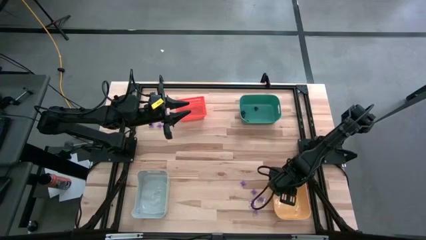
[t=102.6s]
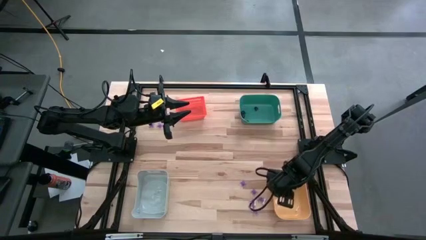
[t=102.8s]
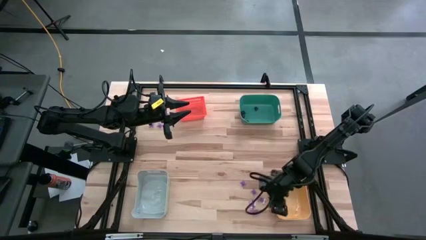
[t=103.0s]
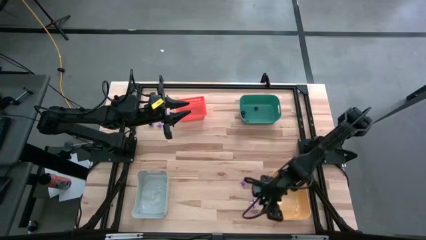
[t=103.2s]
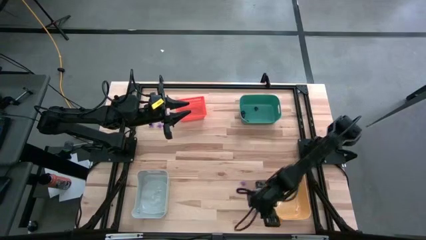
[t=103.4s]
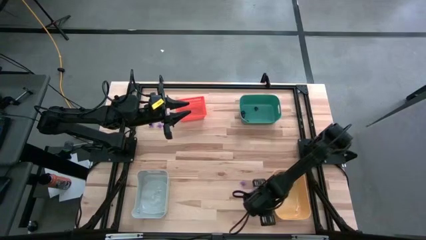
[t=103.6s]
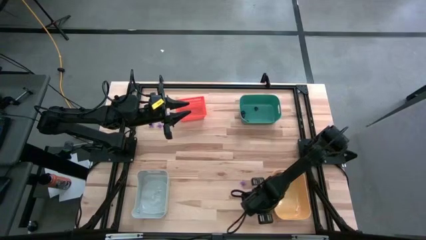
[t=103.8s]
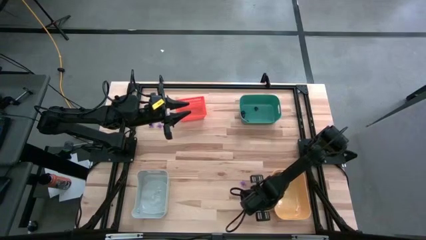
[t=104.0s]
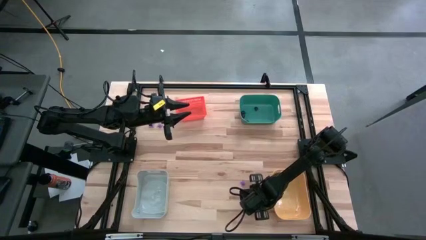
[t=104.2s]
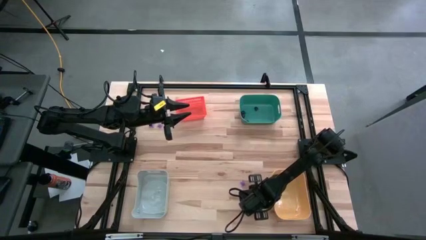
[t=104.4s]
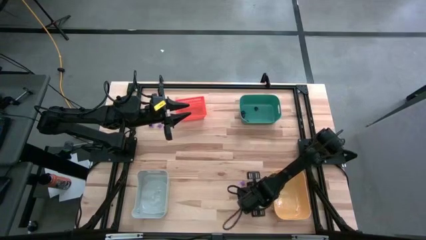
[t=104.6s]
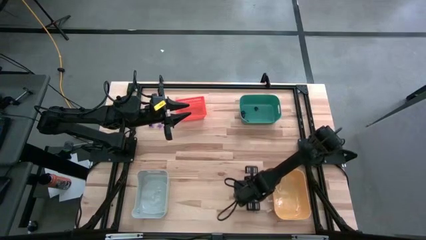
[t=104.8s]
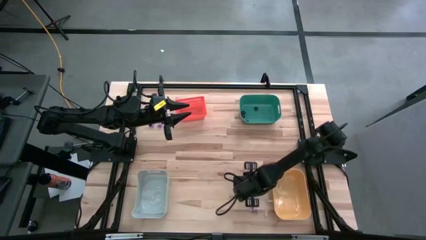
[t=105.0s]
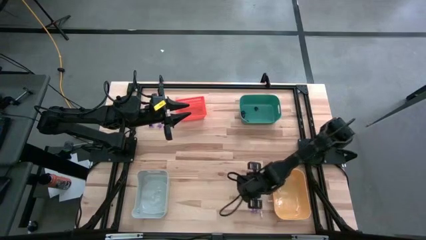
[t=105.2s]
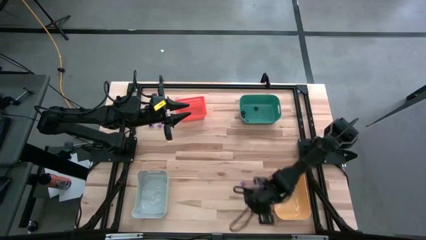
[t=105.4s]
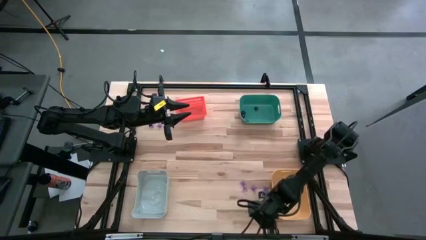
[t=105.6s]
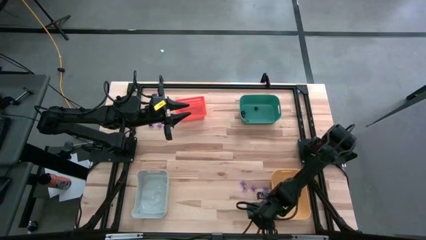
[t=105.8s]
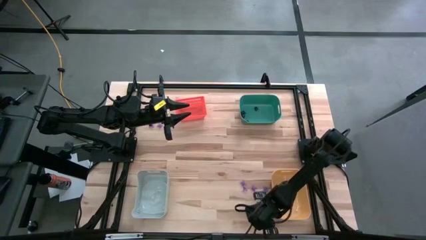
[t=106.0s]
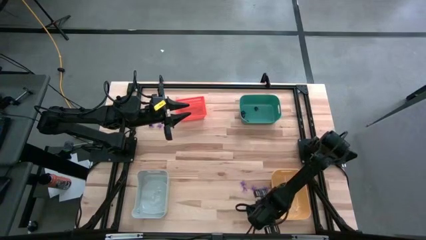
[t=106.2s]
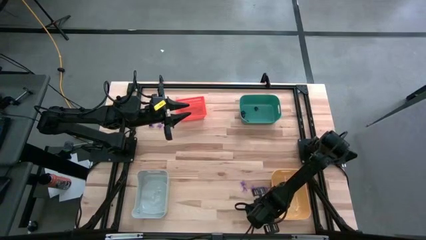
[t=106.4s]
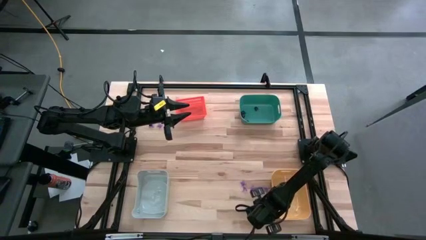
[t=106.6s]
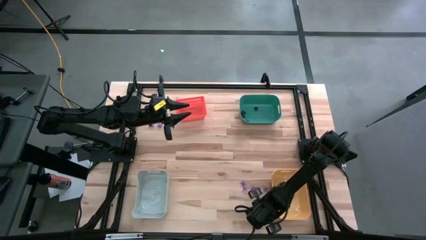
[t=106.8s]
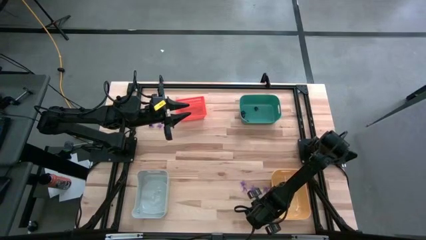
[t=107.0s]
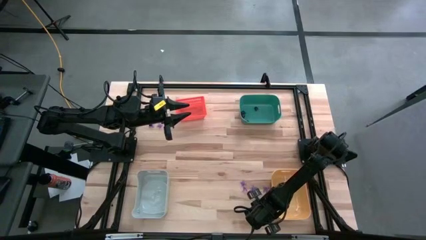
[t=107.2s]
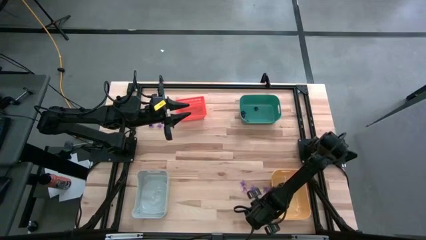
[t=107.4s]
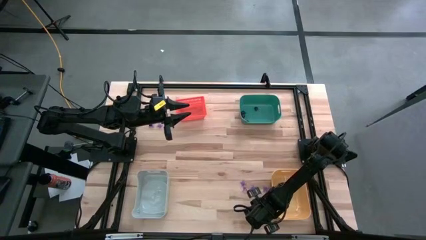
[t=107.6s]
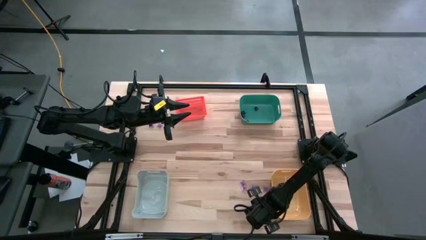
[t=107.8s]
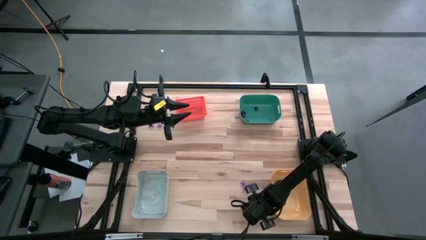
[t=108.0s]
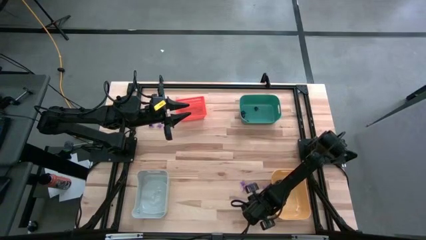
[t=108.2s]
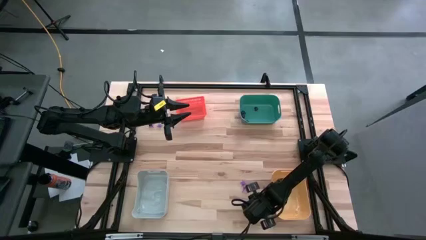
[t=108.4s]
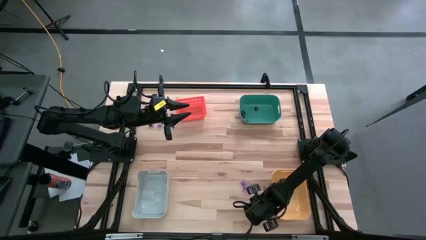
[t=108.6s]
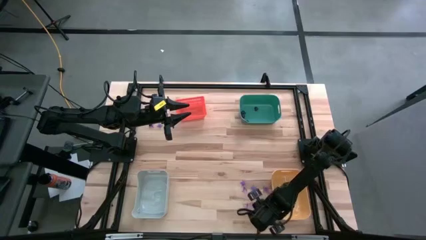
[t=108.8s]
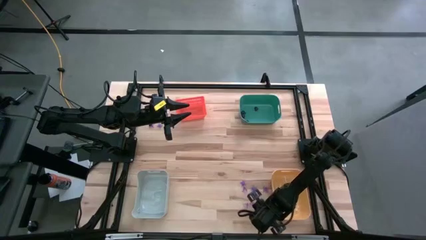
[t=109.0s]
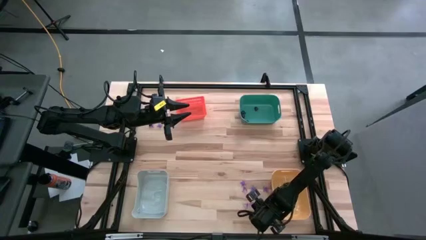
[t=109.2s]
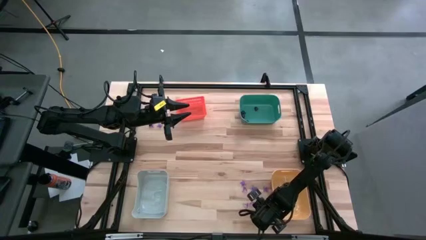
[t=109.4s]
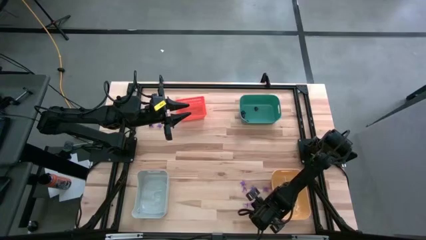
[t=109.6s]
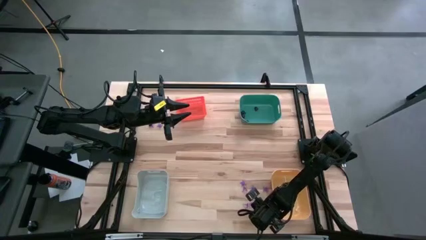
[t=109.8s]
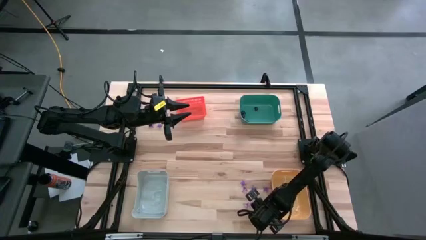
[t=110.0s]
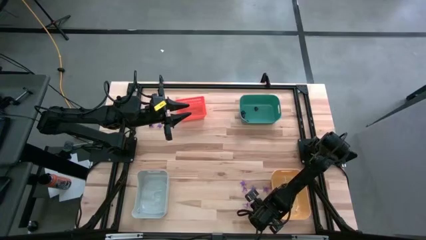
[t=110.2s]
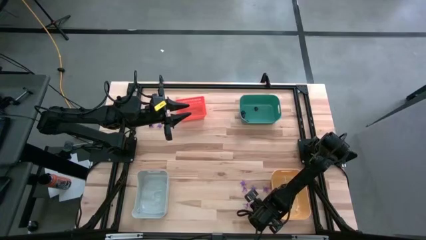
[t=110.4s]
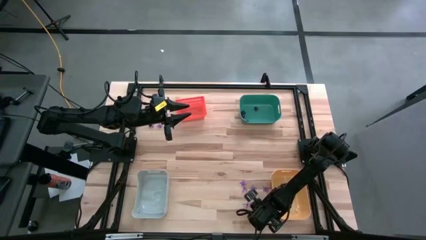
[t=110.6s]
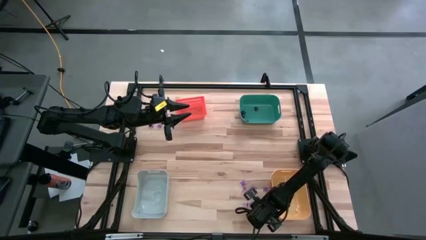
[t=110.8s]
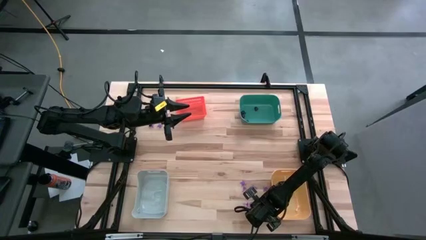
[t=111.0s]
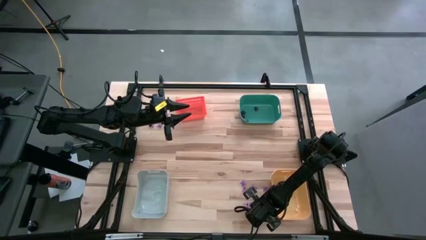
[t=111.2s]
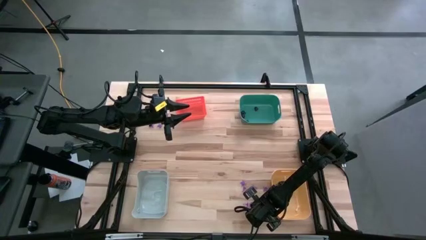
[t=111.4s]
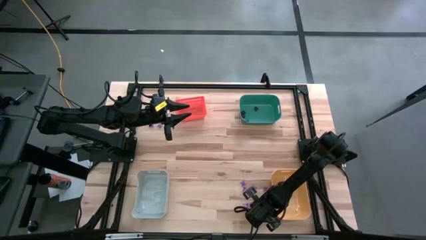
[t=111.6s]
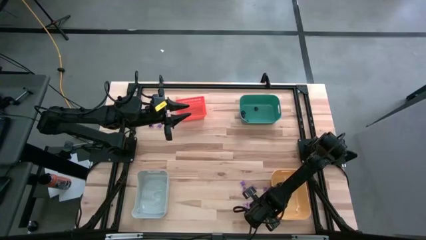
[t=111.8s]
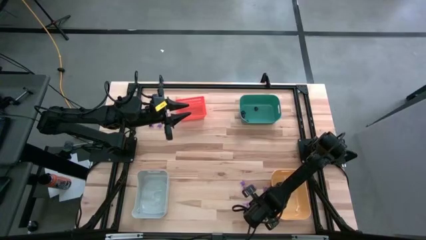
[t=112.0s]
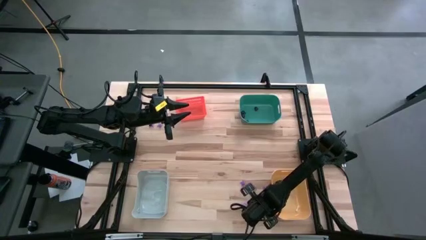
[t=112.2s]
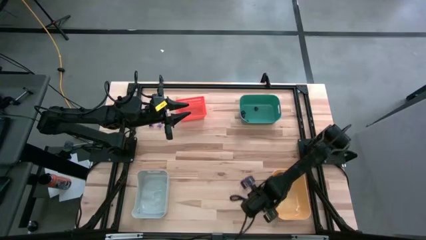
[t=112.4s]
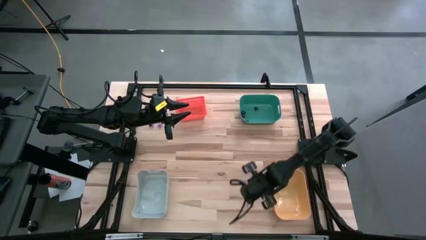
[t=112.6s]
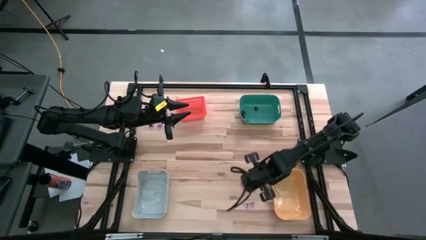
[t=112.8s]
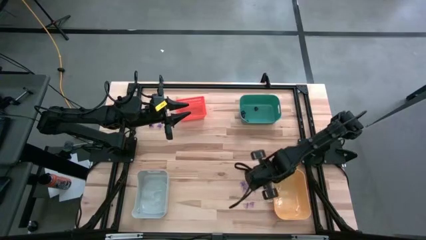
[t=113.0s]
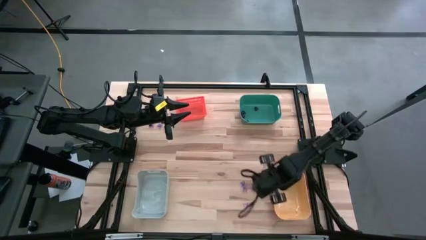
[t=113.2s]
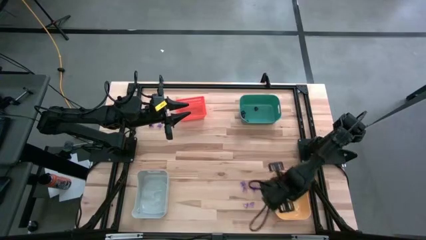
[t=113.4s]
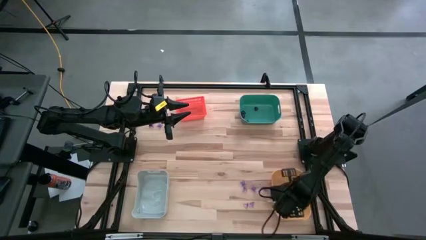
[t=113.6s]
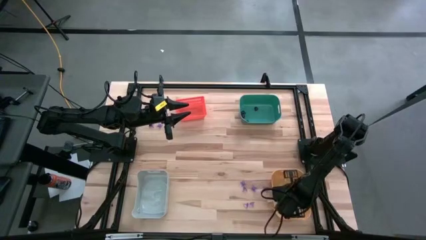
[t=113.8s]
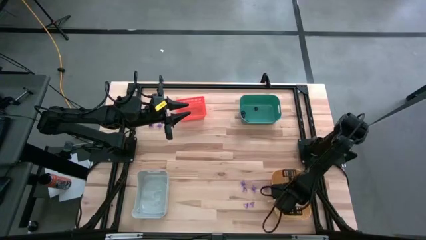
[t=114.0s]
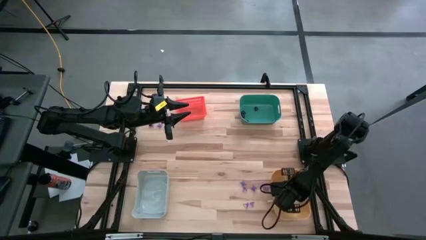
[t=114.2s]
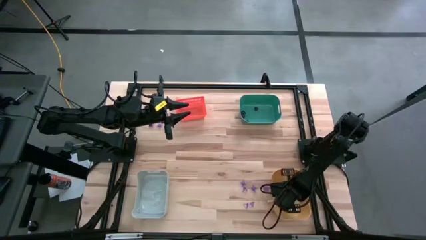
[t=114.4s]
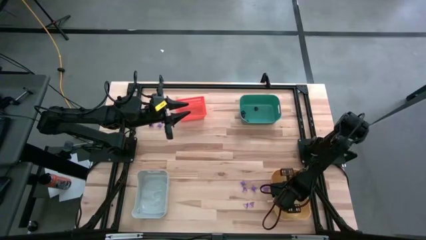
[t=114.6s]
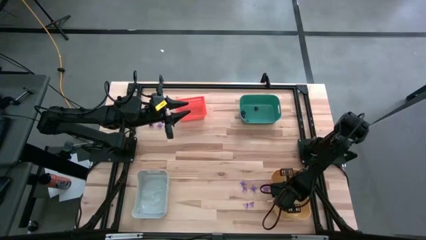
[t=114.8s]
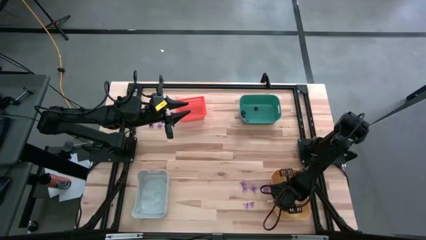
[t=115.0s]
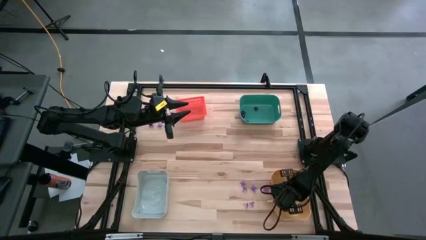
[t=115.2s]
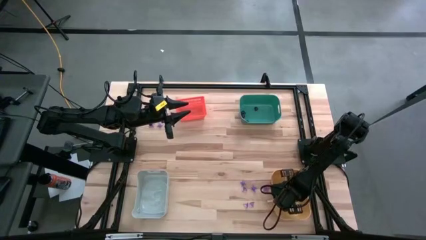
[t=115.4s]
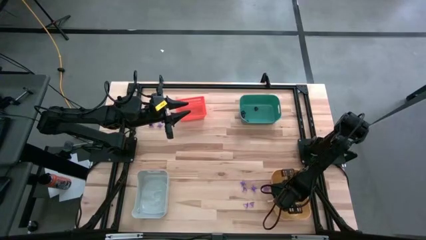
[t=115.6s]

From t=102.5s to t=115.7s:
Task: Sort Halloween decoration
Put the white bone toy into the yellow bin

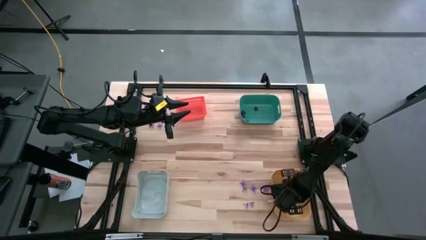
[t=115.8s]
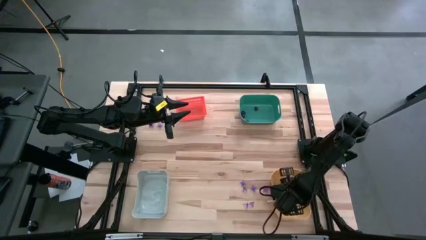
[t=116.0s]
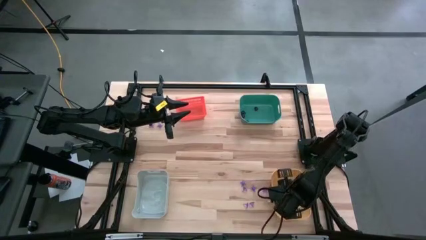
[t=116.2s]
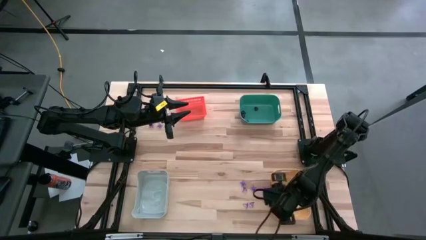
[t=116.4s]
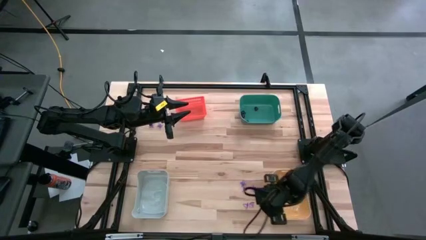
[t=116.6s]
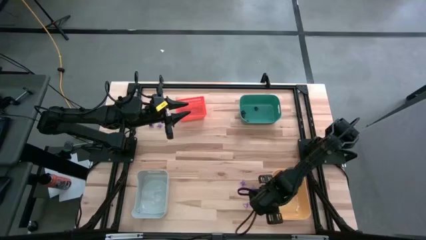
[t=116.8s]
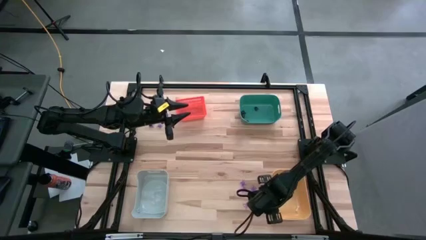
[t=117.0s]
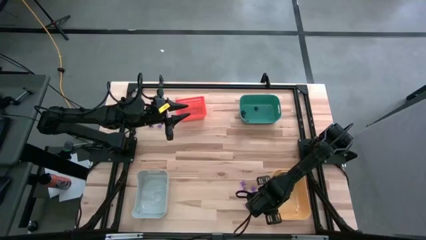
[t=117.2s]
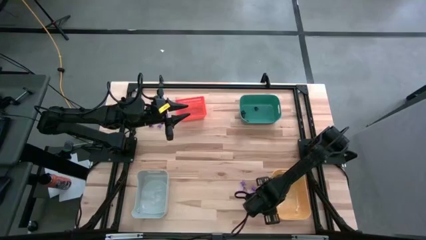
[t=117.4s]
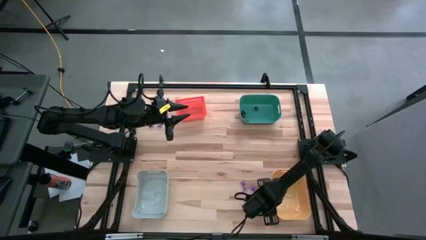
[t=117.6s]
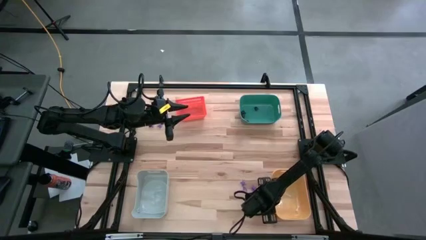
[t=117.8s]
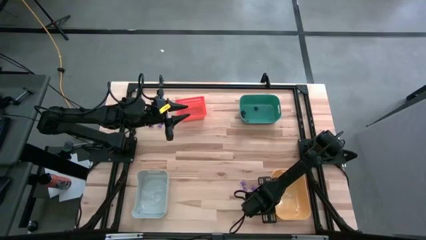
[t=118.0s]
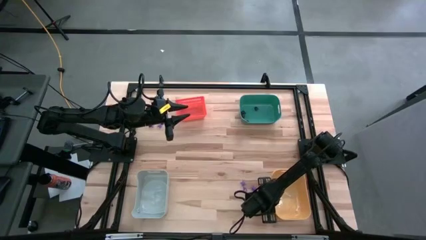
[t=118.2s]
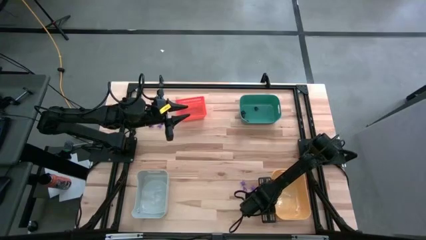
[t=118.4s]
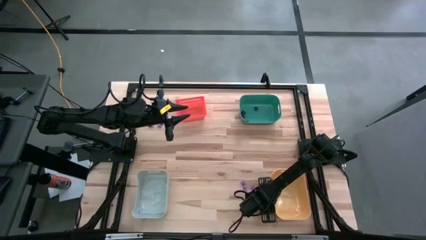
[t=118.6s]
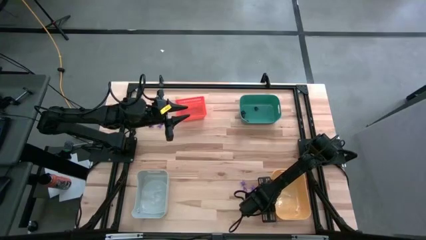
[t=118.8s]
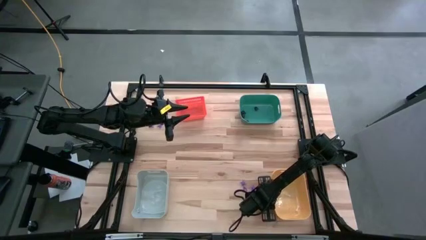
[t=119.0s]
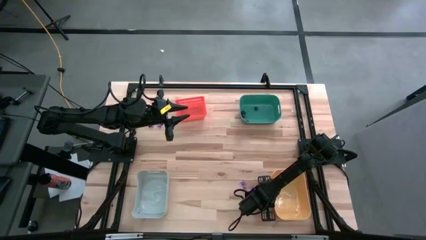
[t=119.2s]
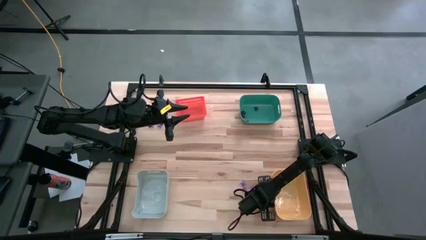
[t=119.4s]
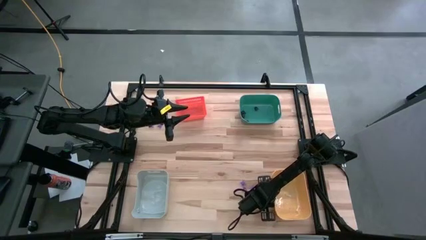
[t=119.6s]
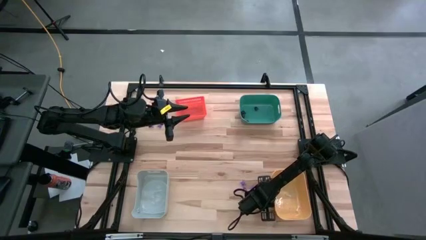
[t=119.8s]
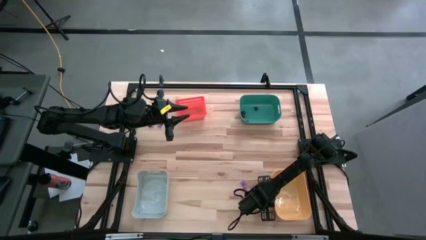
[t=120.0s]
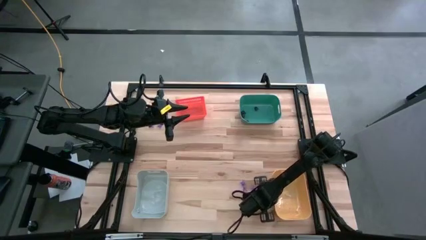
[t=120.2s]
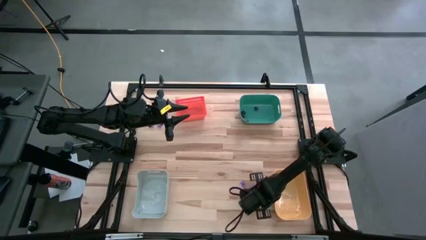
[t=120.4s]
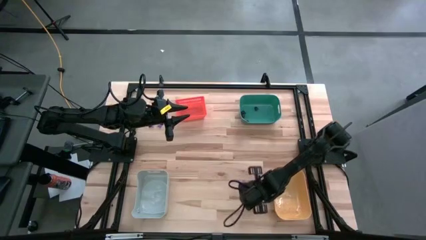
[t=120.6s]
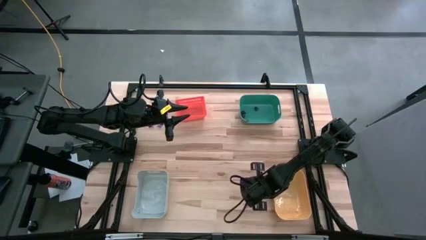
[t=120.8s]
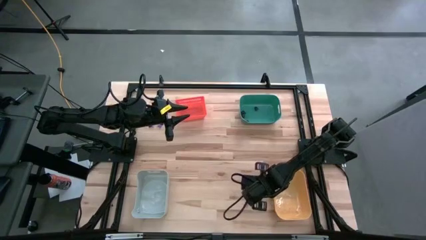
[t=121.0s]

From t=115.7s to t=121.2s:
Put the white bone toy into the yellow bin
